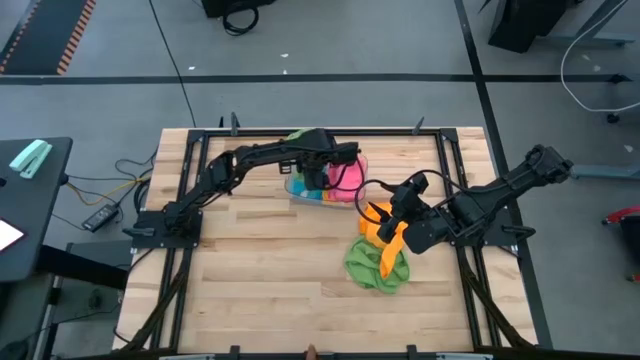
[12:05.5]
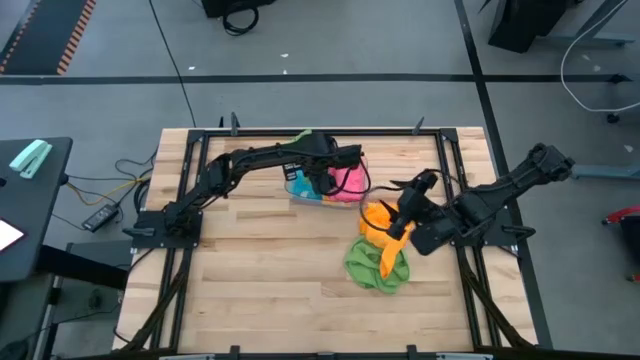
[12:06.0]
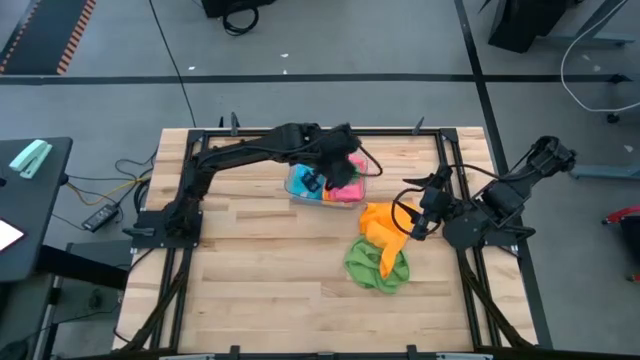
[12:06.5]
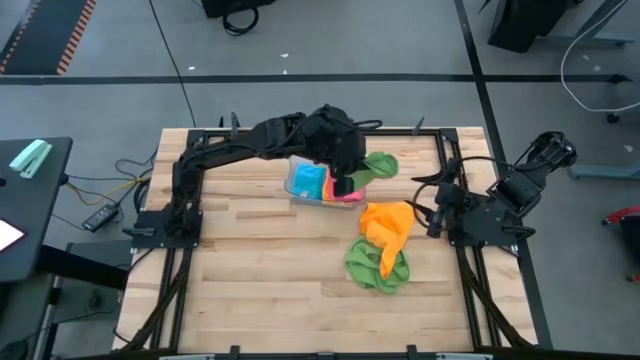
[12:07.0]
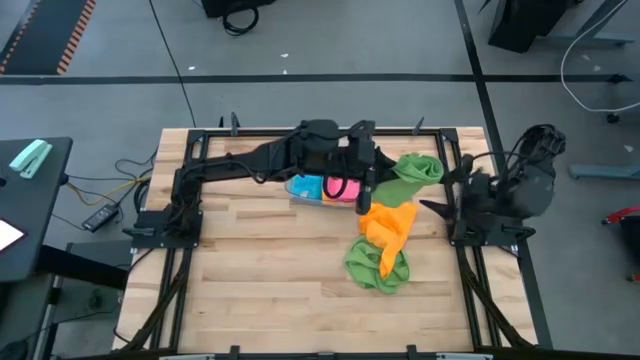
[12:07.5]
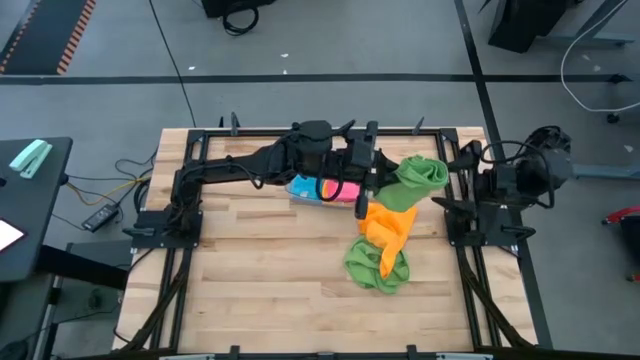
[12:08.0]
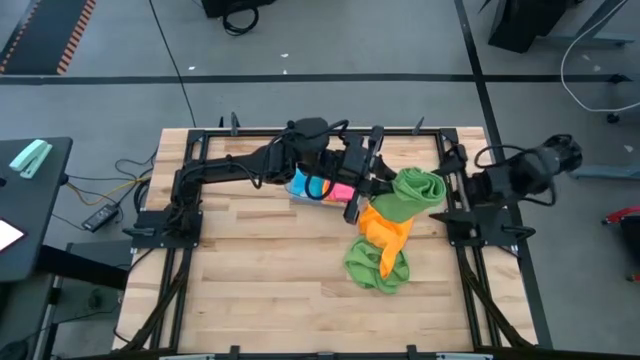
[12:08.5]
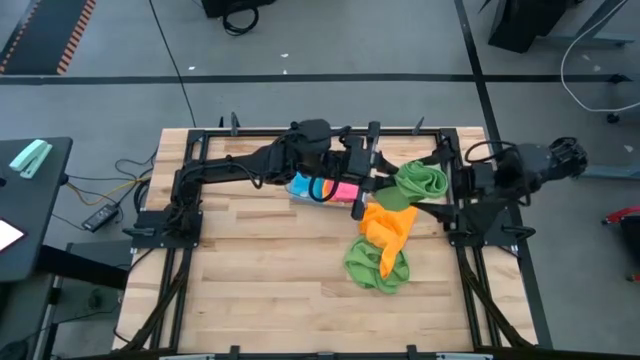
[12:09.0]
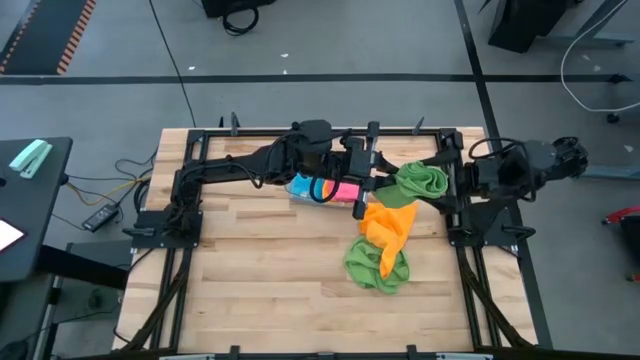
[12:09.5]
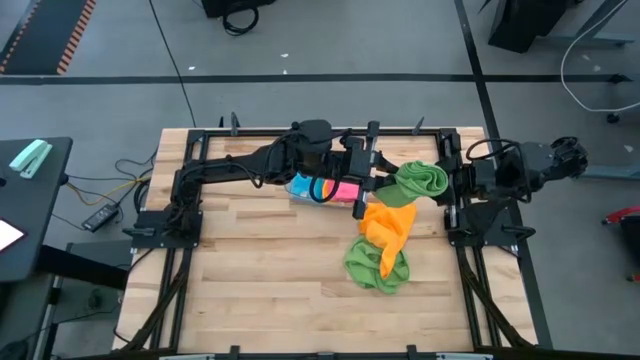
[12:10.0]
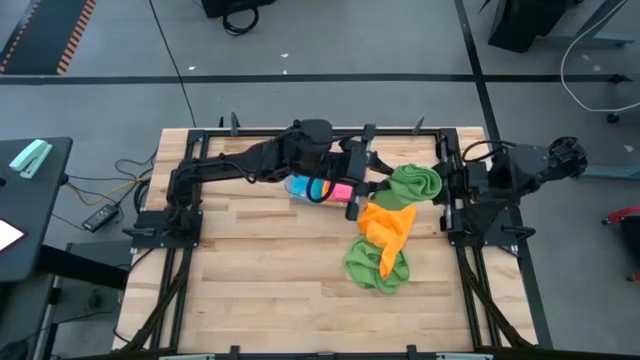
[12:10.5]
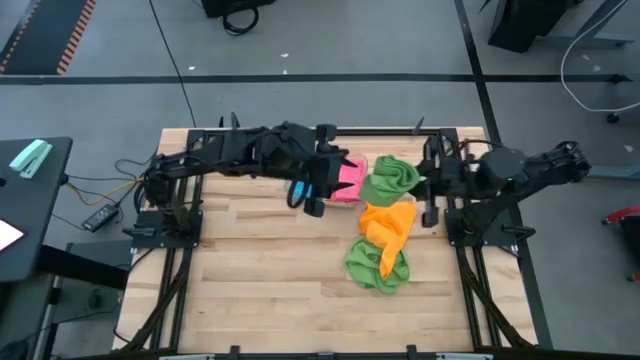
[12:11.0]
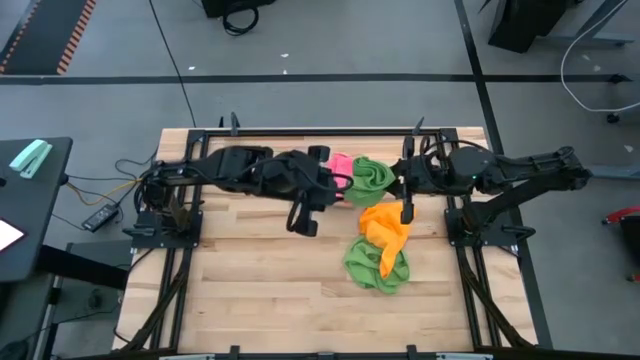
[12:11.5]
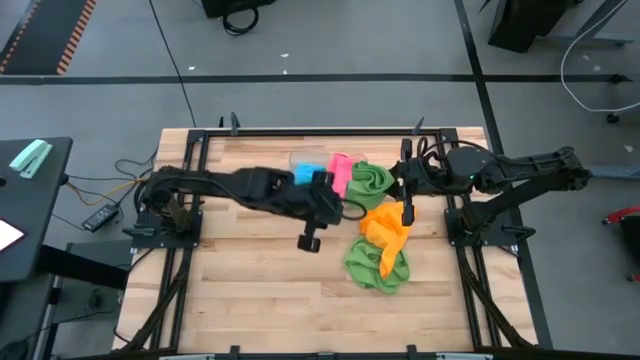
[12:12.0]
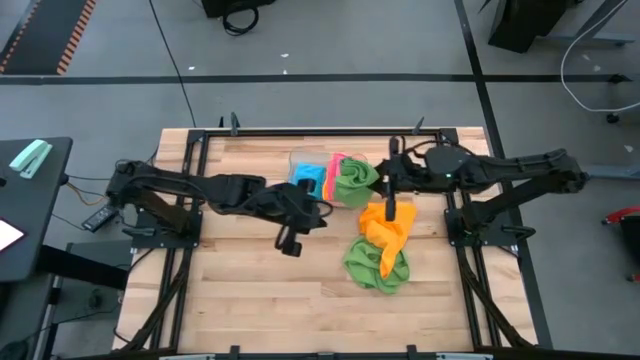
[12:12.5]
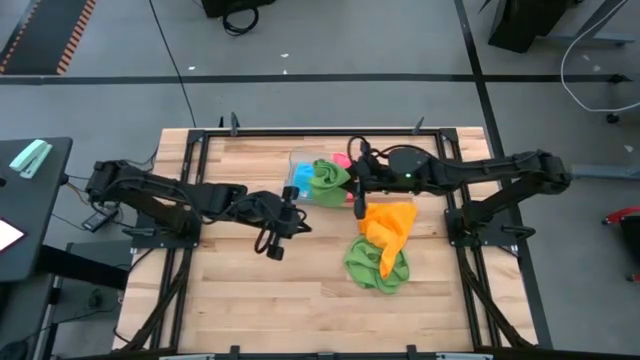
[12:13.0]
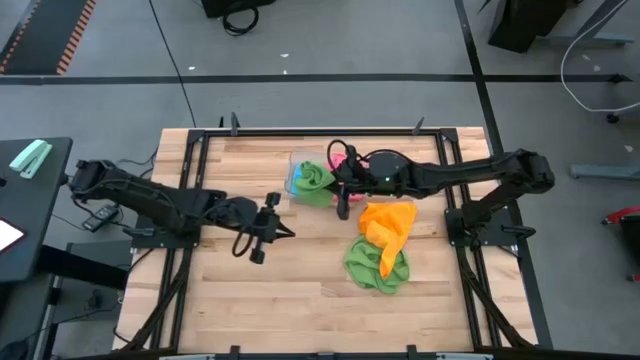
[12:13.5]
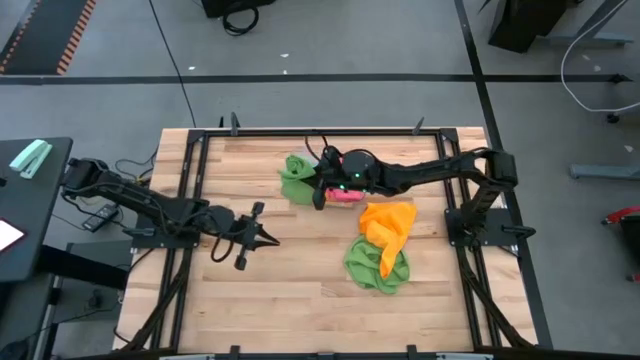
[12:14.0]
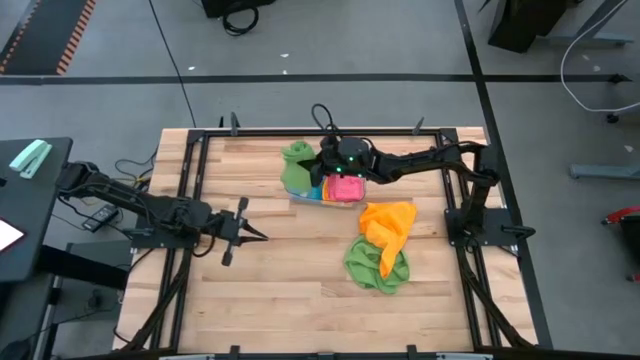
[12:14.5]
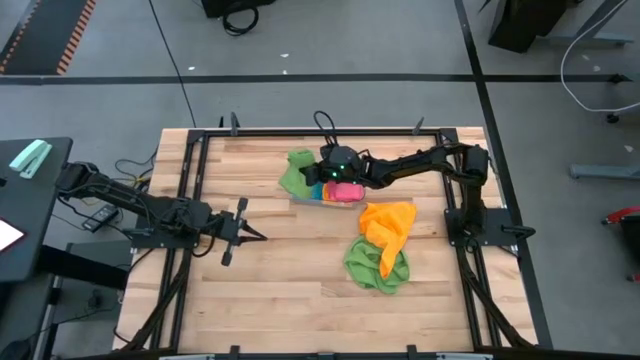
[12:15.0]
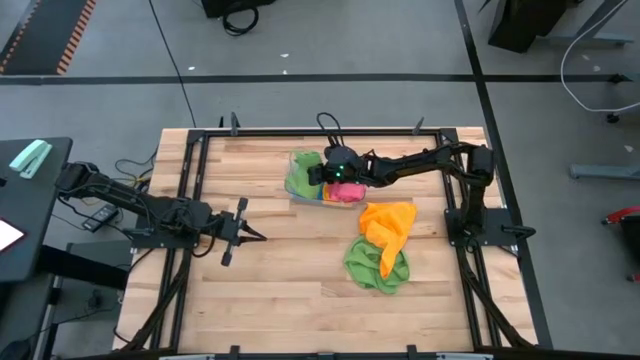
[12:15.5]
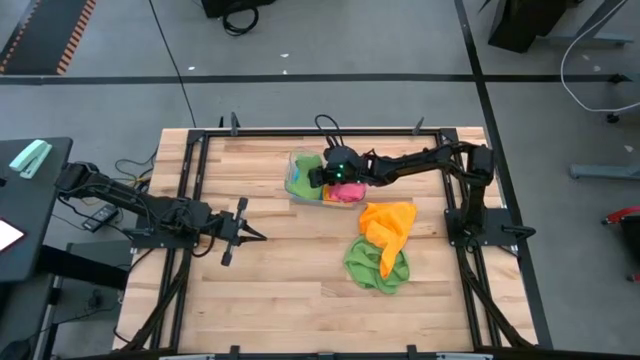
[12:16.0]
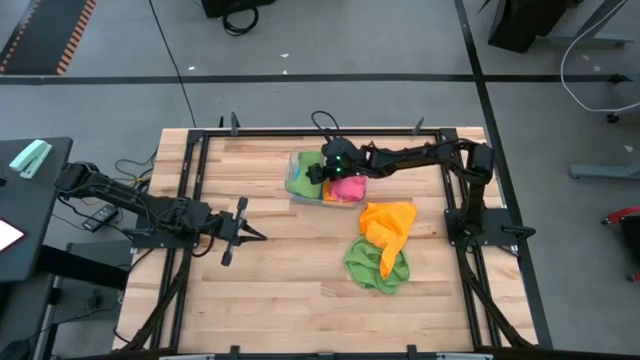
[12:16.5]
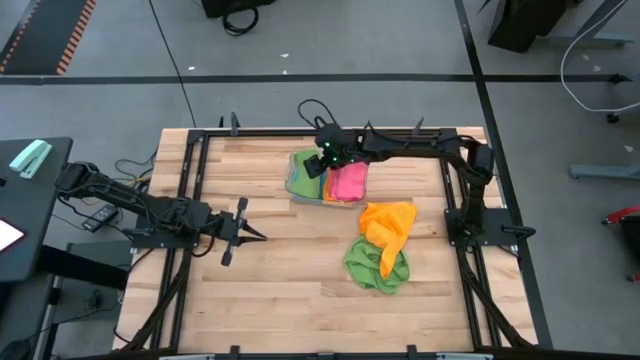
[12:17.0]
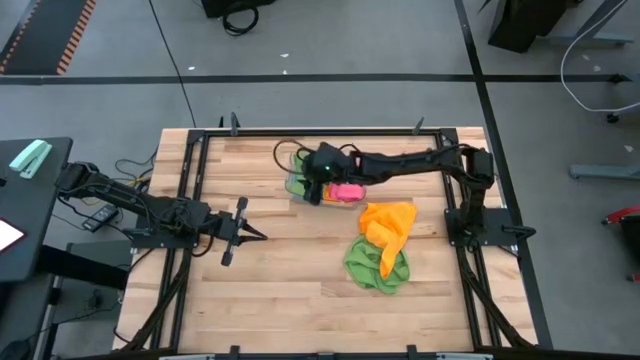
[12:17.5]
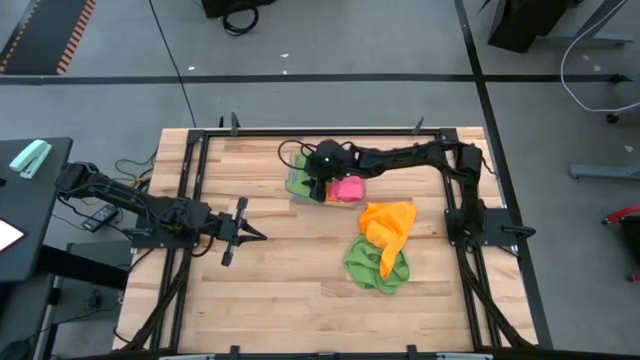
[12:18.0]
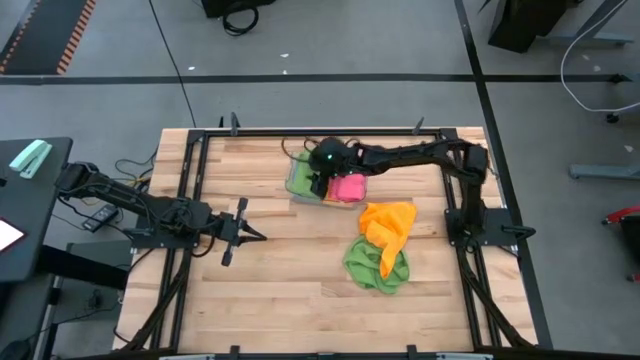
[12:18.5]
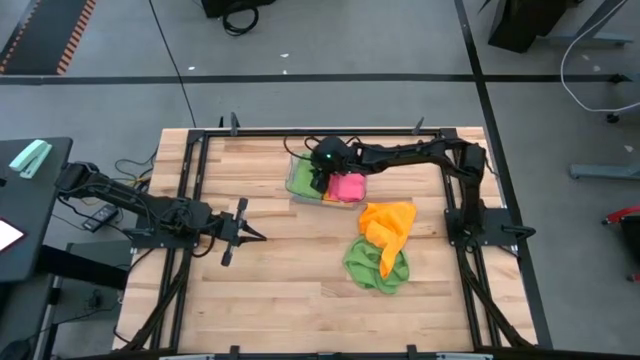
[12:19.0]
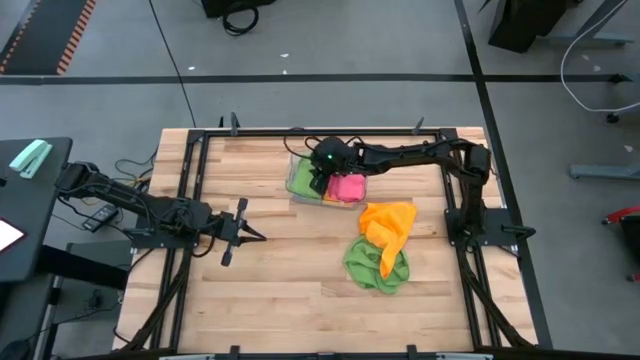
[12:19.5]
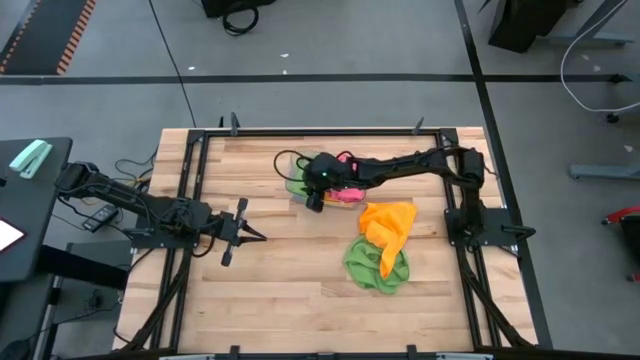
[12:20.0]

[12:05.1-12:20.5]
Task: Fold microfiber towels
Put the folded green microfiber cloth into the transparent bin

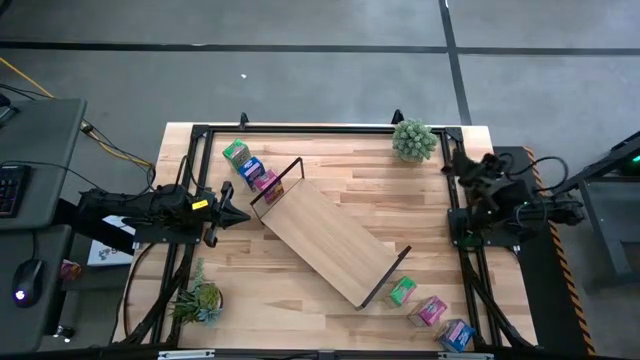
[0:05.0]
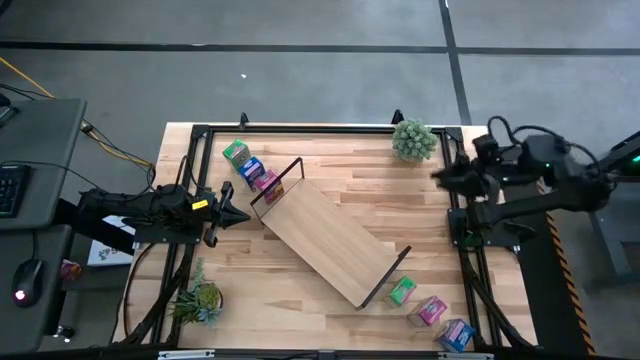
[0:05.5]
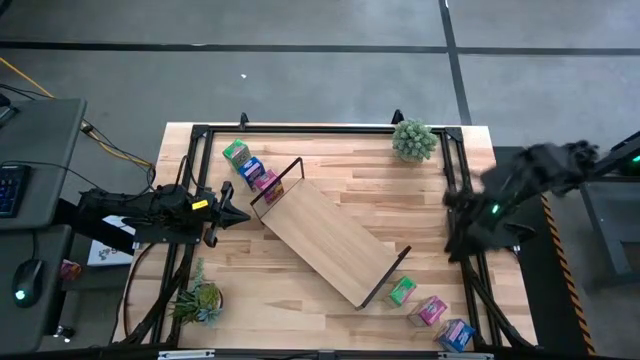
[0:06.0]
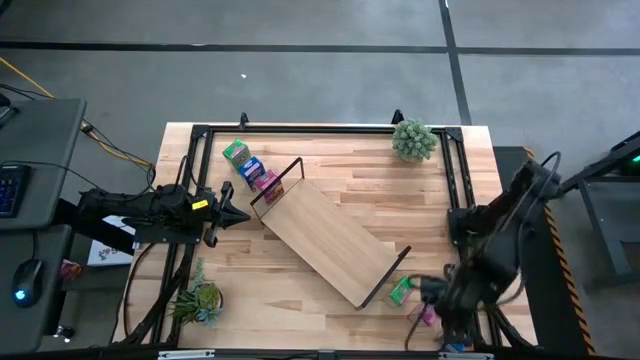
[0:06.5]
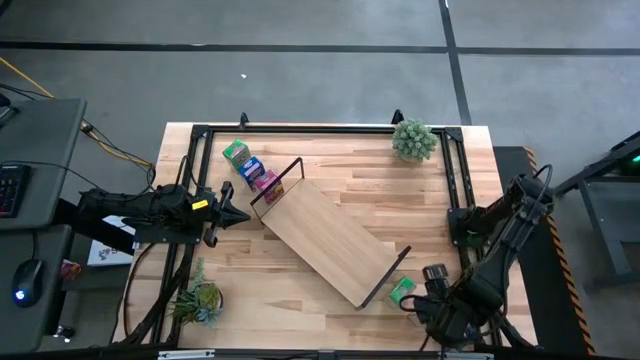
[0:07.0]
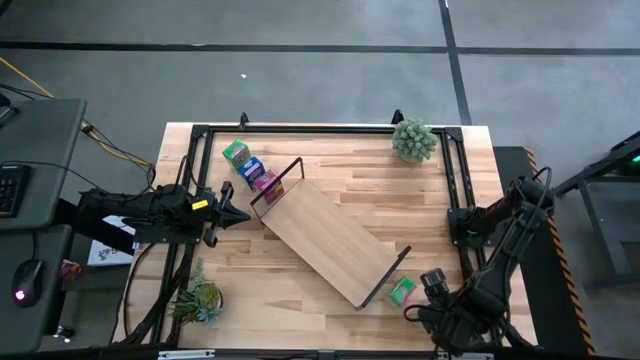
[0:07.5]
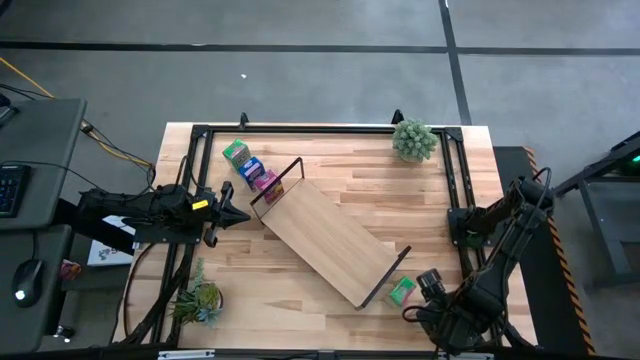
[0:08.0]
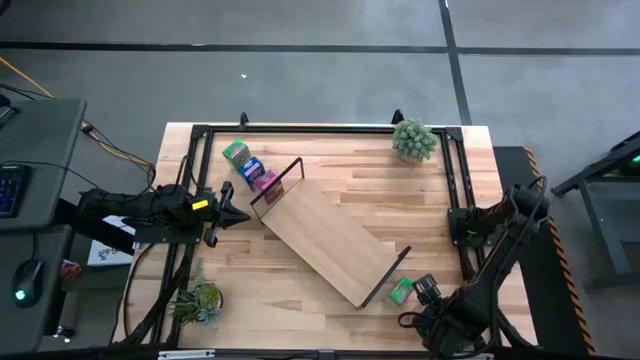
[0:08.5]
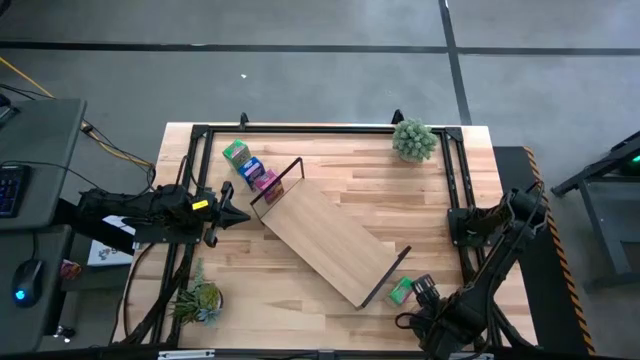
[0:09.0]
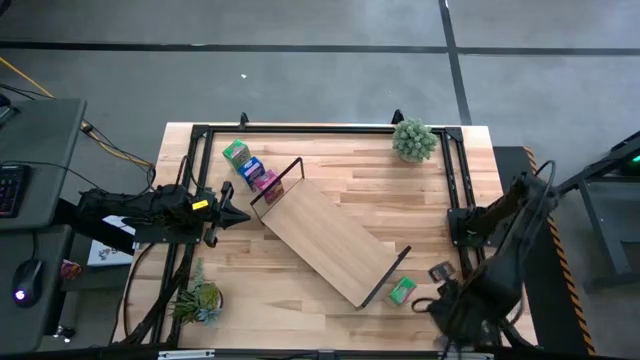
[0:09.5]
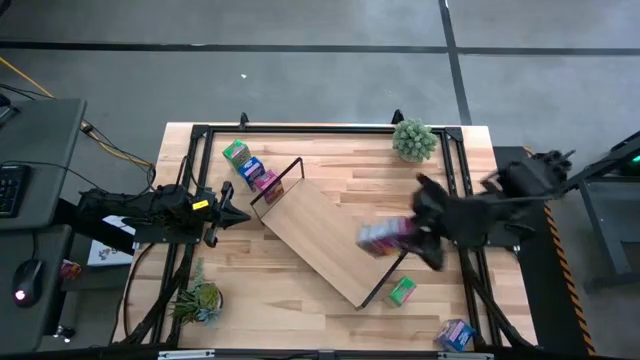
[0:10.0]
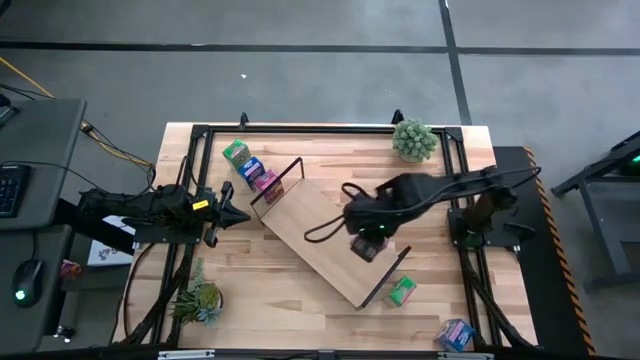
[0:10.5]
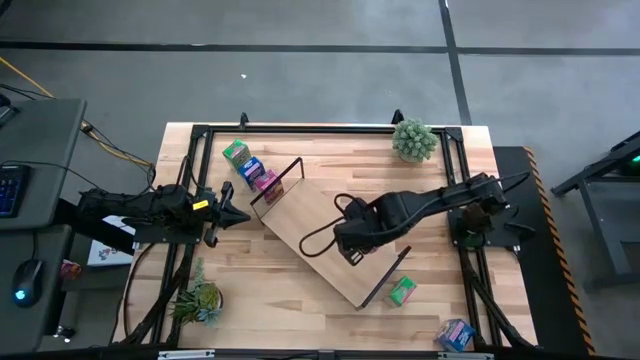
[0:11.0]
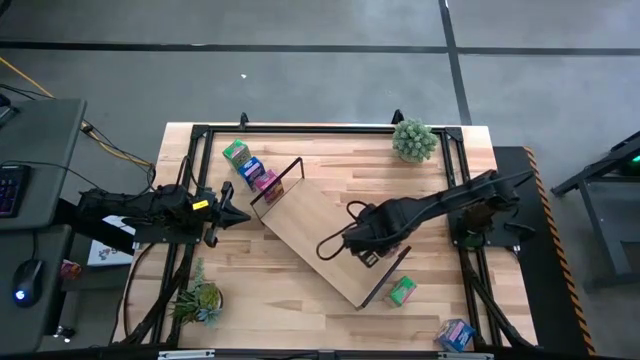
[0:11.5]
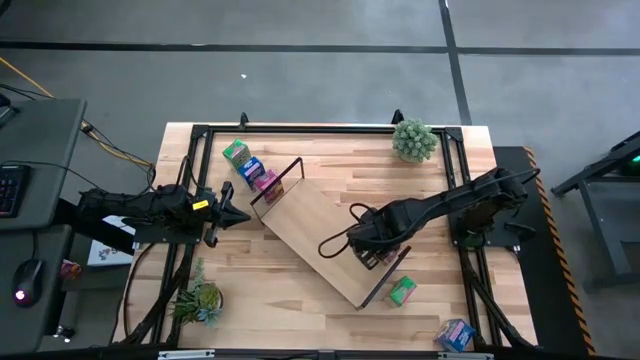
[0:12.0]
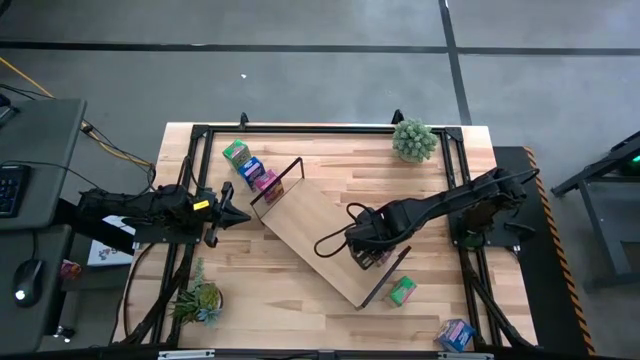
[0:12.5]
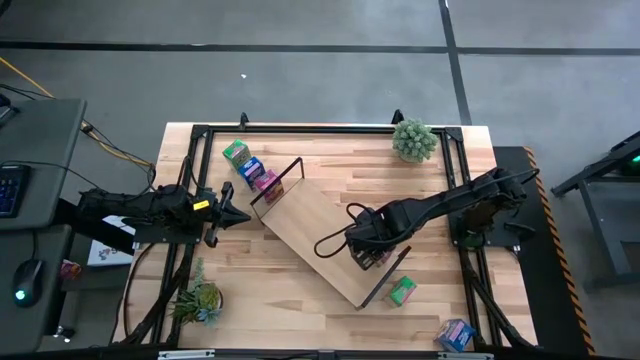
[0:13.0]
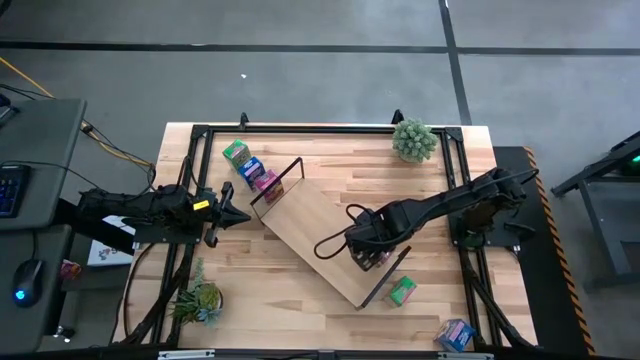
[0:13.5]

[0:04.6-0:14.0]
Task: Stack cereal on shelf
Put the right violet cereal box on the shelf
